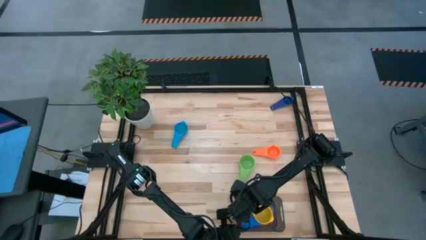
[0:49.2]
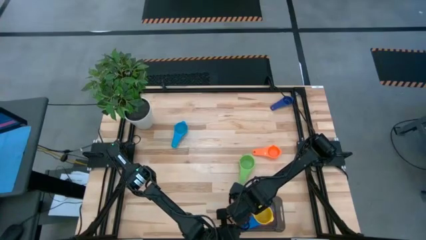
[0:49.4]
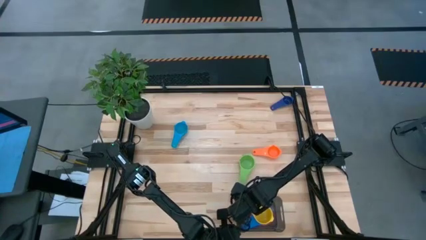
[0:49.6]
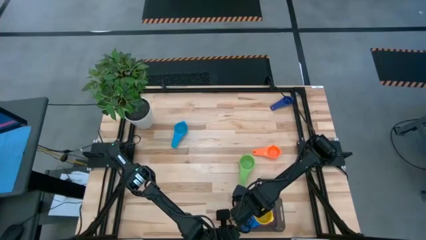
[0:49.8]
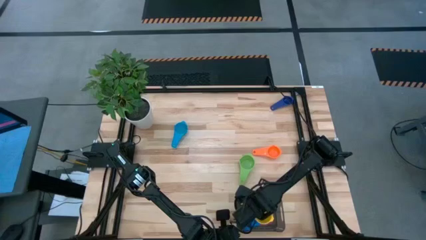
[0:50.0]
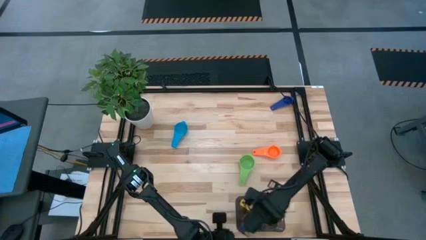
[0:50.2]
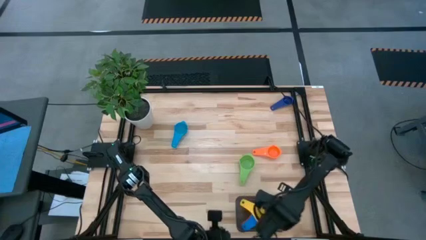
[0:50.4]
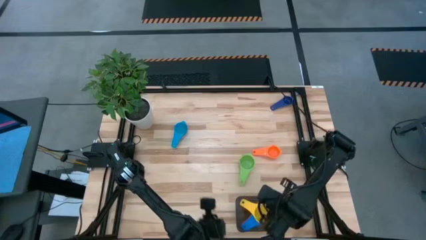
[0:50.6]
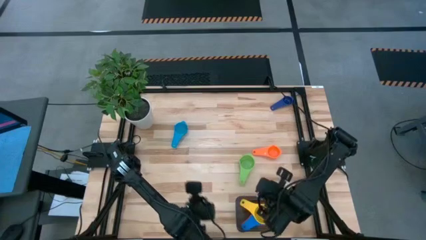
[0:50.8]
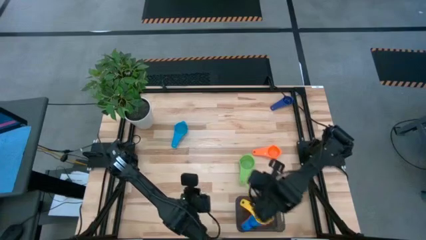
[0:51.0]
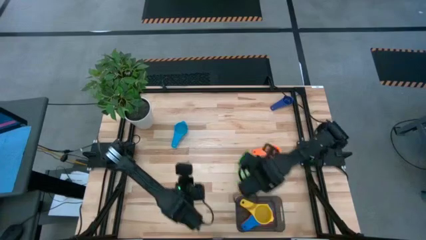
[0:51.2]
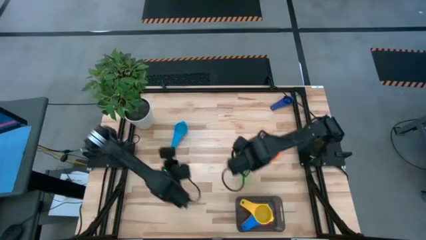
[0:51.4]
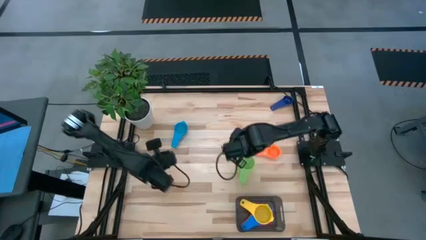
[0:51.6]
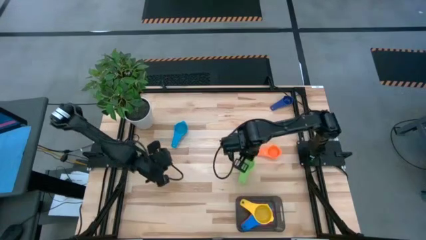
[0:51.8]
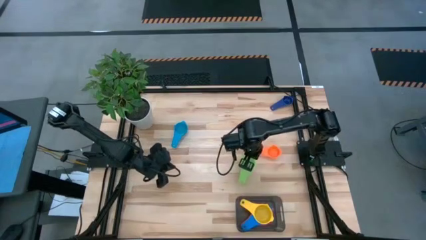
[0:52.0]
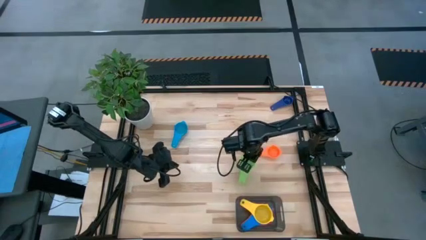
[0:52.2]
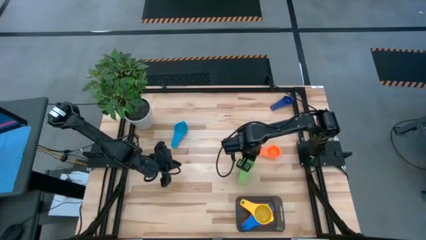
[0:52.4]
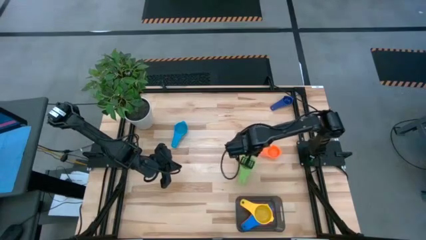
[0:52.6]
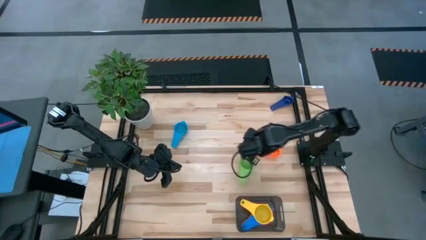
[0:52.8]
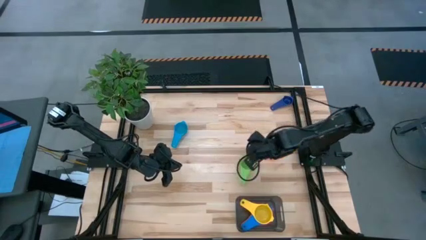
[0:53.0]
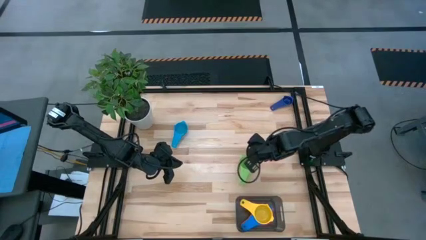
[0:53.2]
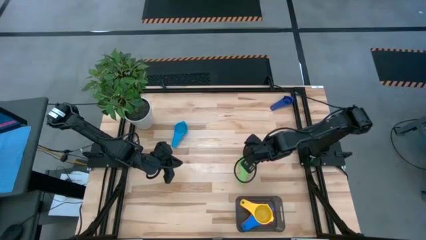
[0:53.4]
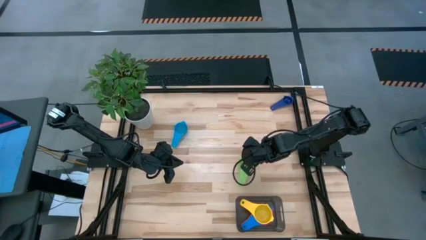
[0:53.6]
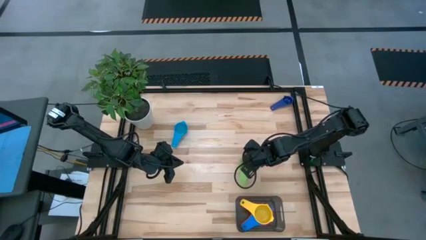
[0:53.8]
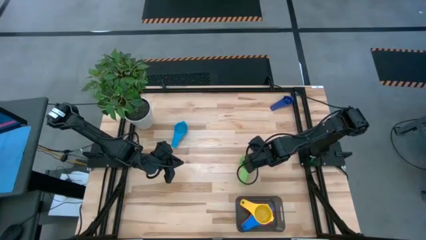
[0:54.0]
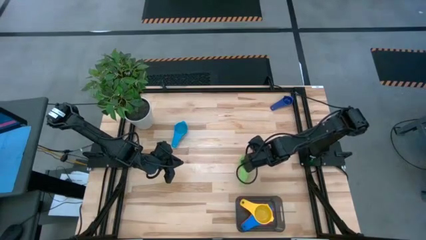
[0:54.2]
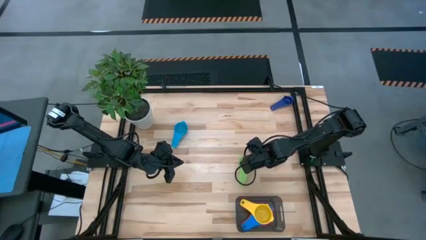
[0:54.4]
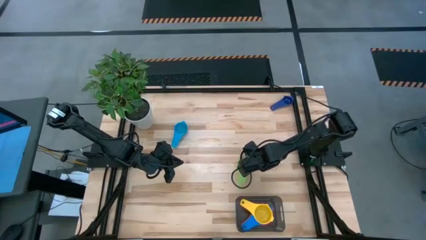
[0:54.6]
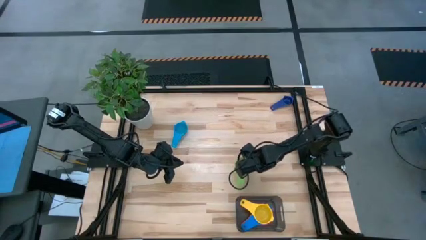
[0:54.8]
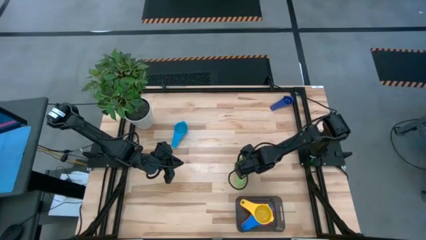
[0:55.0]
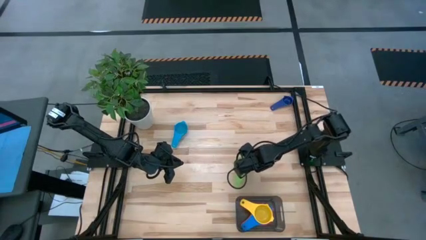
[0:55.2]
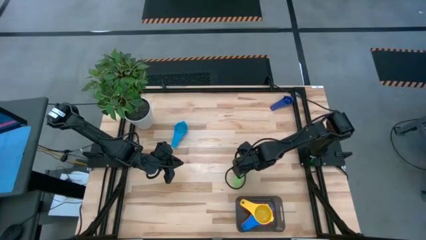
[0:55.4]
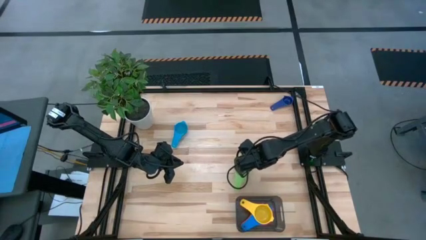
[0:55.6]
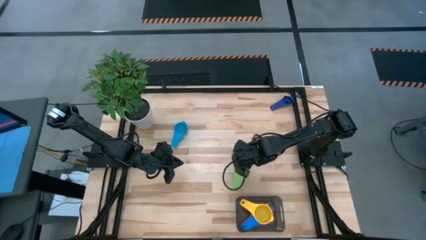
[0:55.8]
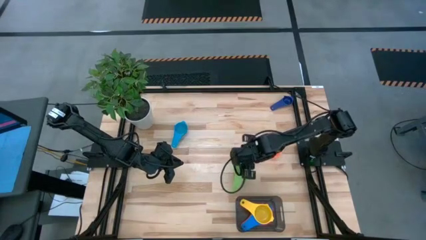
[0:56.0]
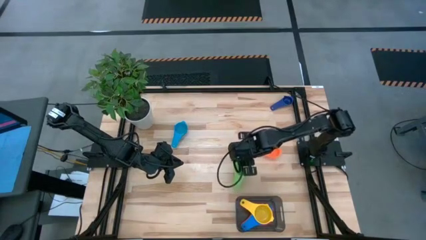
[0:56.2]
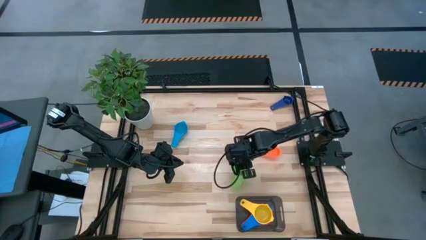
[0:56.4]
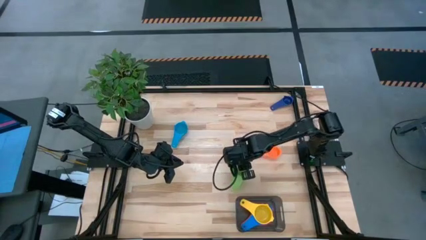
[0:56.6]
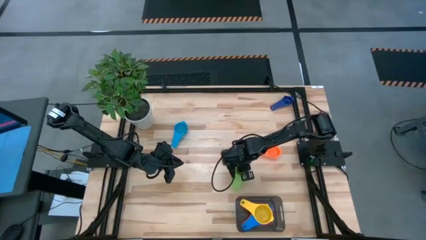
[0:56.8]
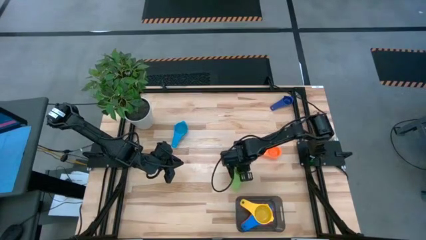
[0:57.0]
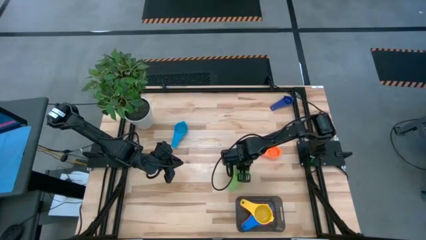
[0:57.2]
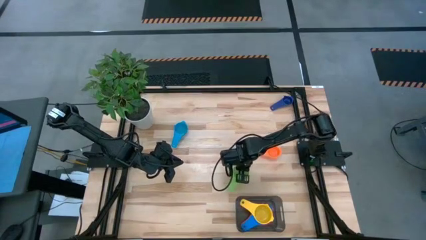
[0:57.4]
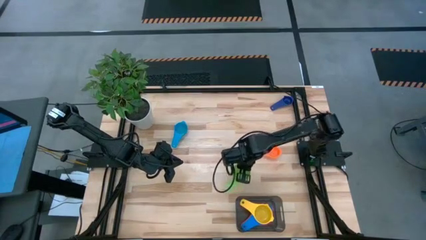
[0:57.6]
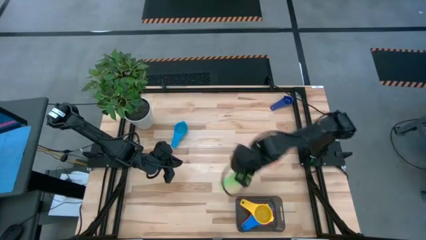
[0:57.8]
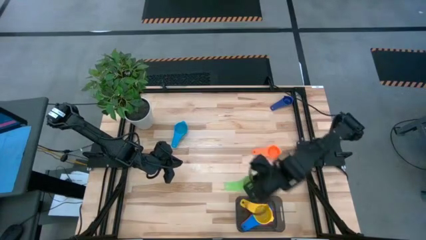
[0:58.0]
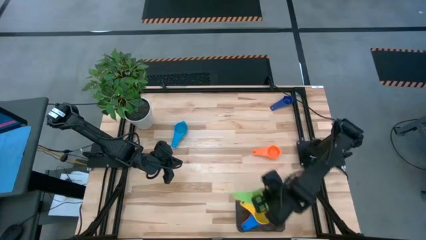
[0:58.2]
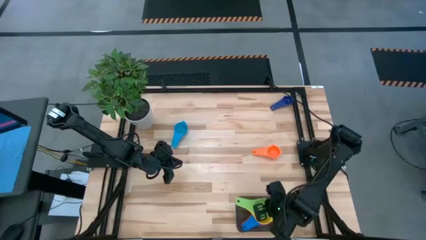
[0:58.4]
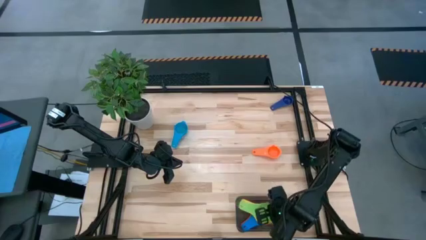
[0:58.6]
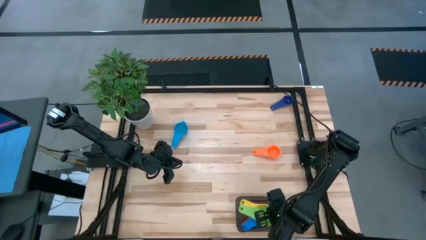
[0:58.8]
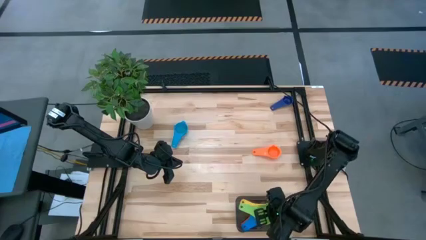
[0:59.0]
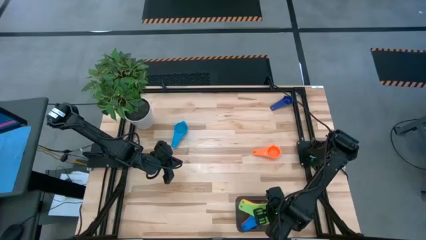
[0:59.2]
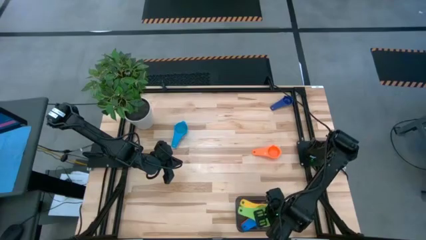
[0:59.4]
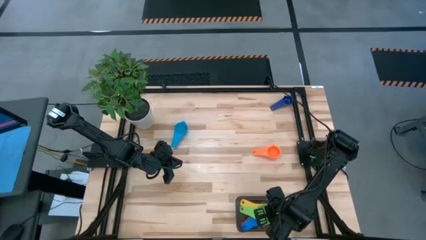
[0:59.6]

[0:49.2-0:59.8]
Task: Nest measuring cups in basket
Stack the green measuring cup on top of the yellow measuring cup in the black bin
